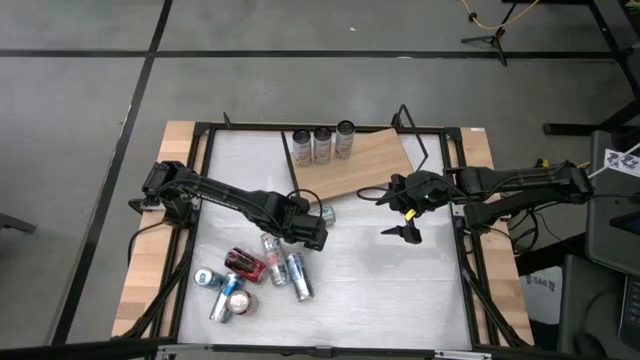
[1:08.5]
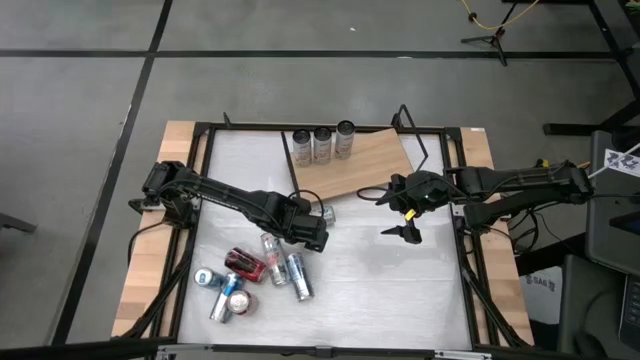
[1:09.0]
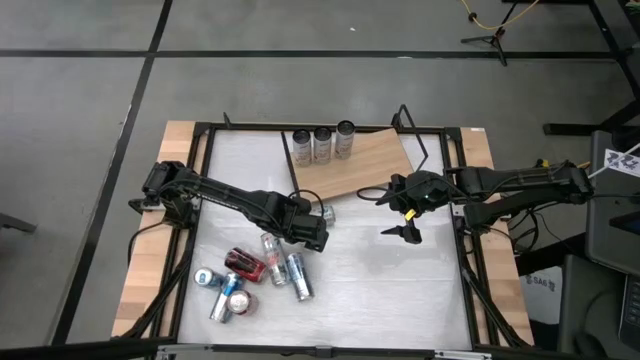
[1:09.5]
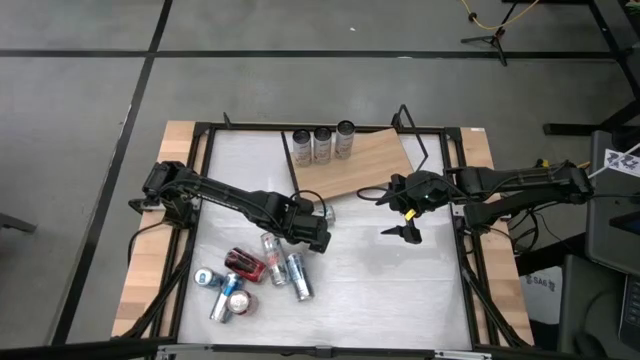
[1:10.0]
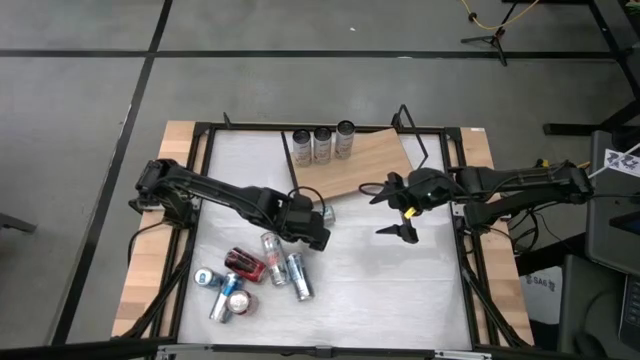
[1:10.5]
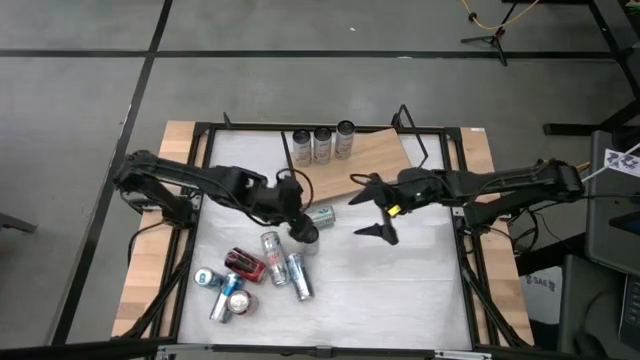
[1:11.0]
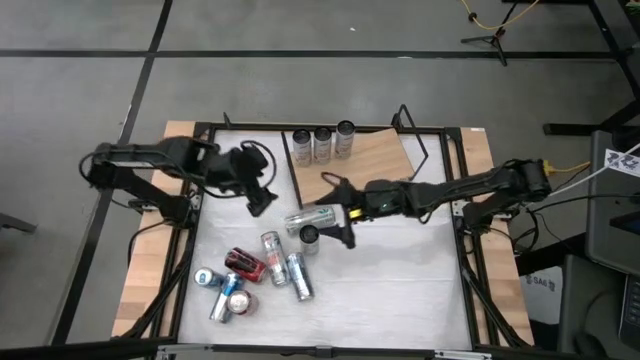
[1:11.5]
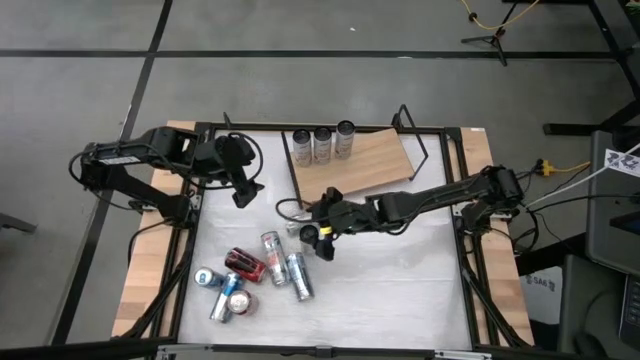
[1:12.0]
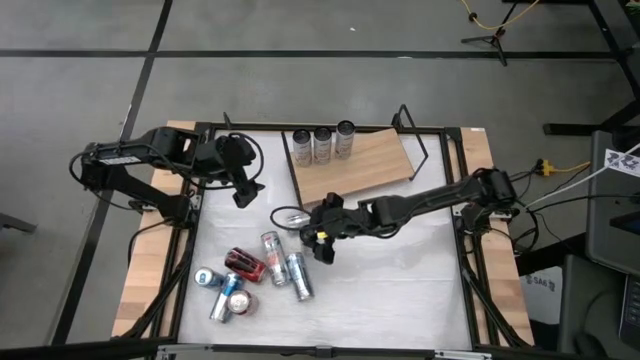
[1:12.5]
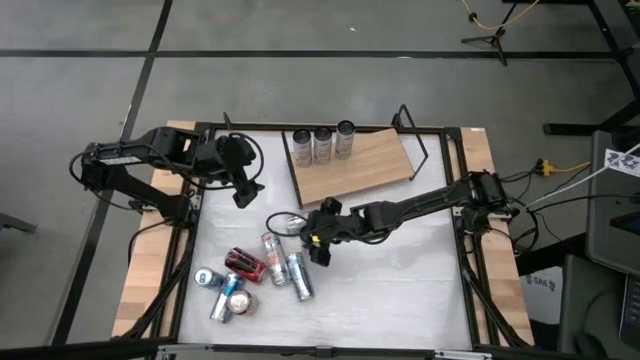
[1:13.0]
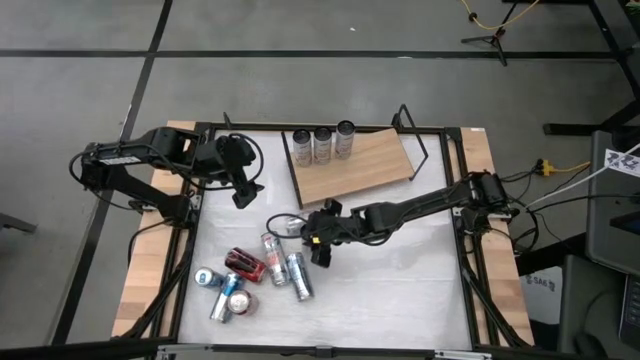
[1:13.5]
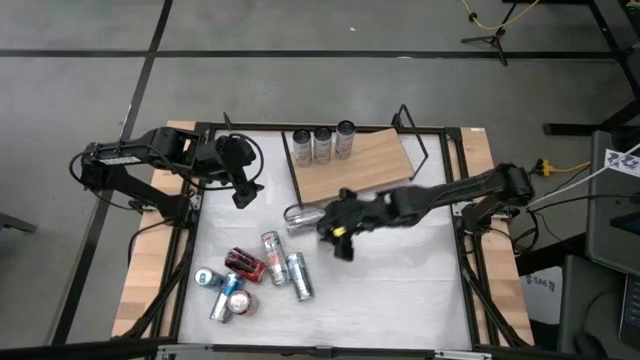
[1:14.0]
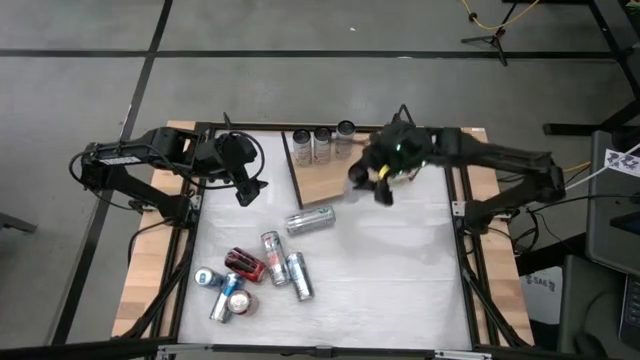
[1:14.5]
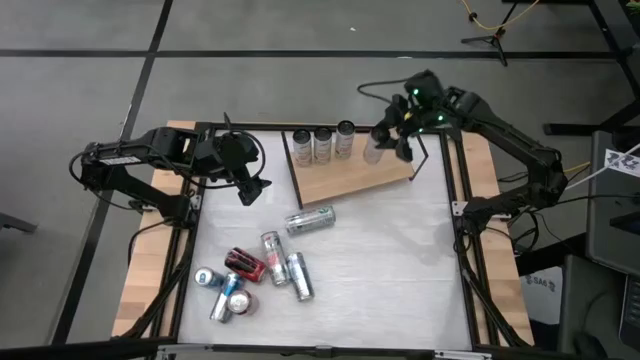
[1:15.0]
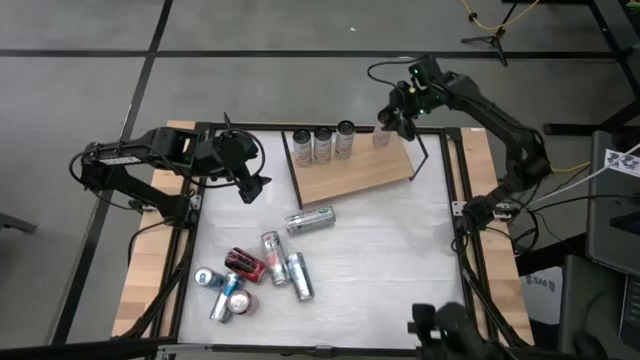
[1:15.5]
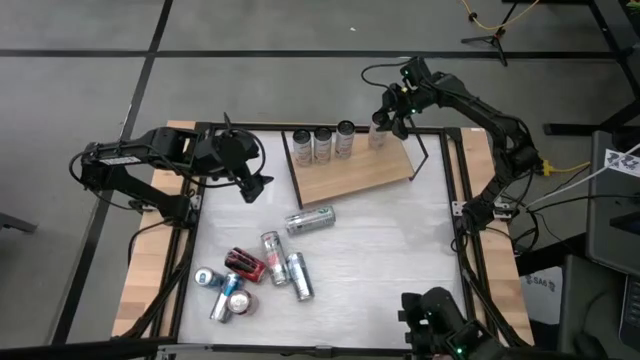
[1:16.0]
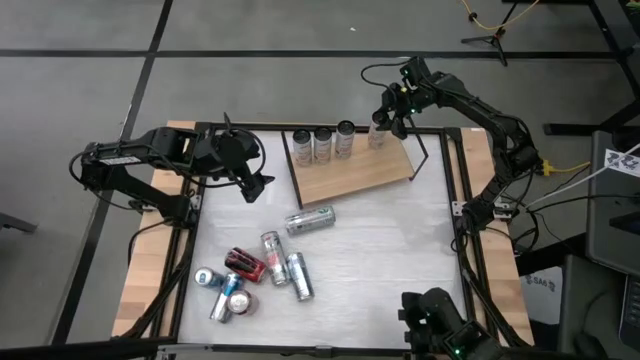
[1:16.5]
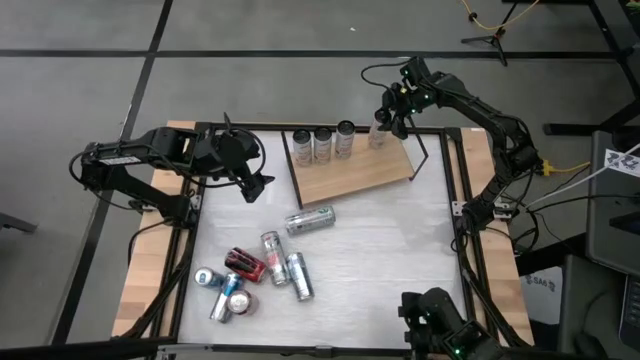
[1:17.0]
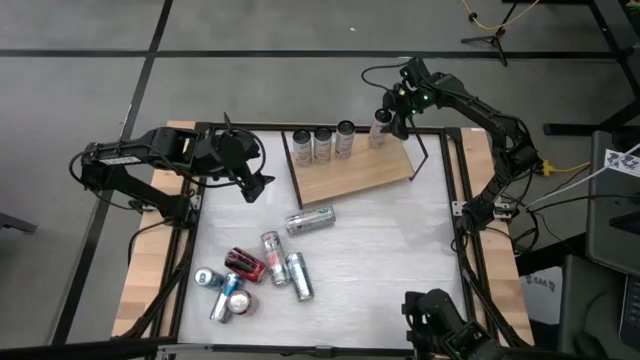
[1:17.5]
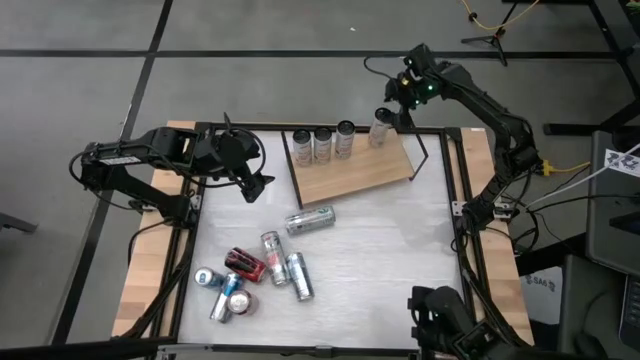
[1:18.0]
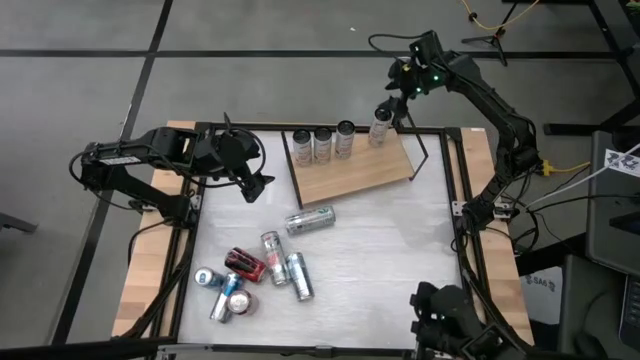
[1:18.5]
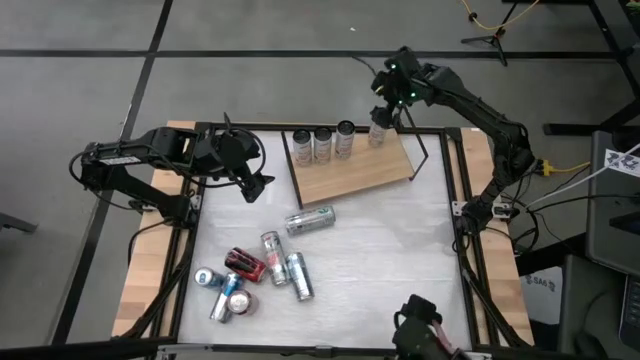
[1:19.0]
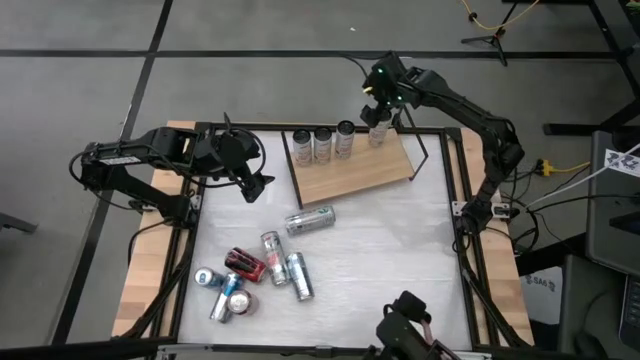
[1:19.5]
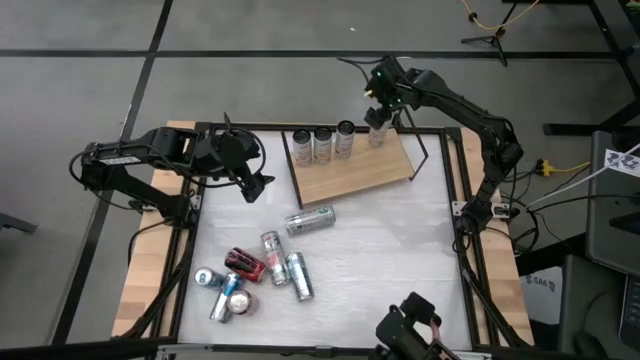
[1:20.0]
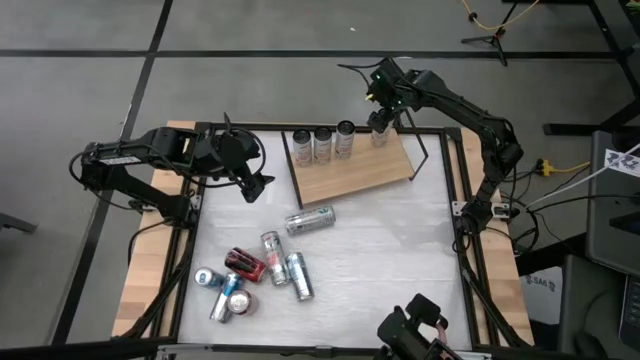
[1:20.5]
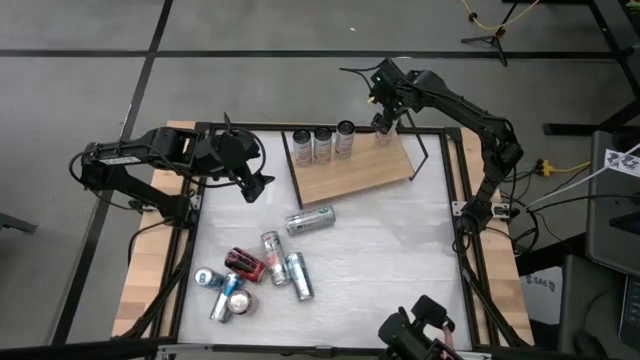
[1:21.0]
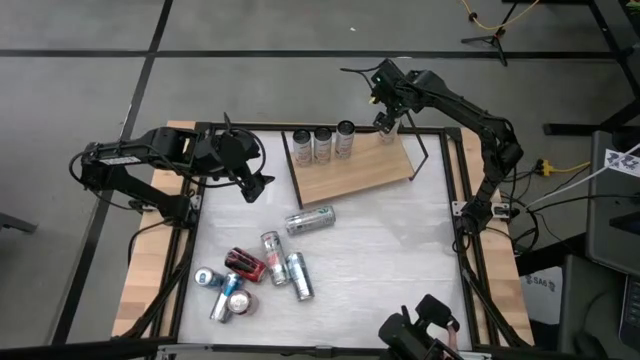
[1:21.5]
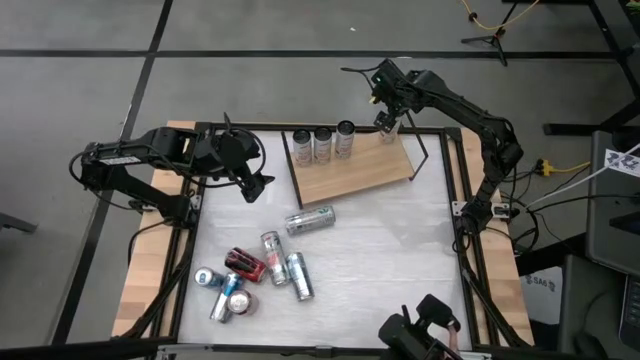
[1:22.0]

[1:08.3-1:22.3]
Task: Place canned beverage on shelf
Put the white pink soda can on the shelf aligned with the other white pink soda can

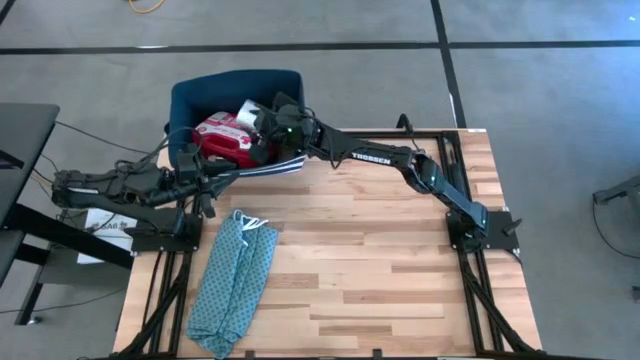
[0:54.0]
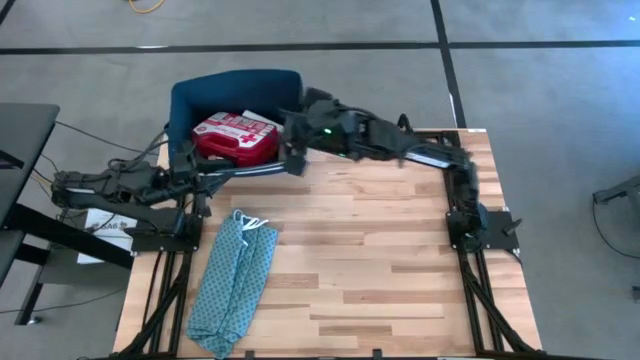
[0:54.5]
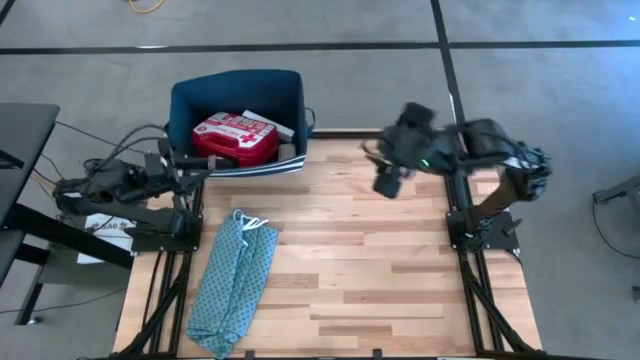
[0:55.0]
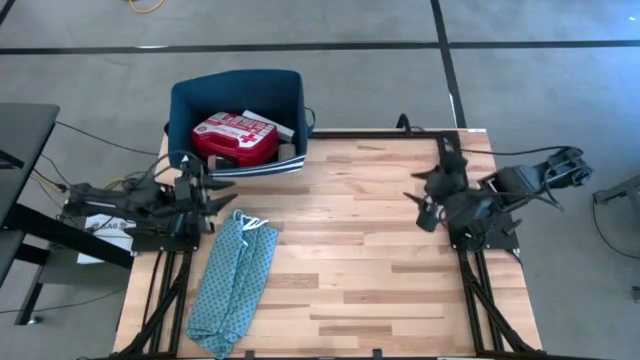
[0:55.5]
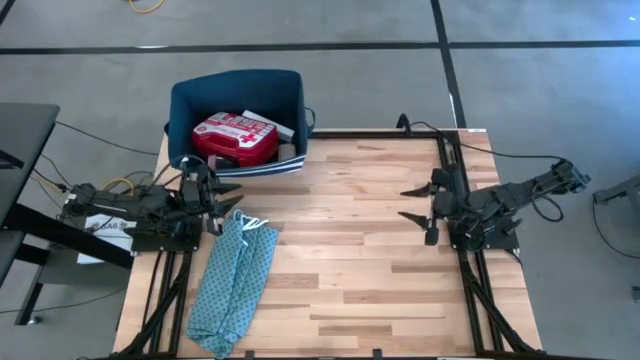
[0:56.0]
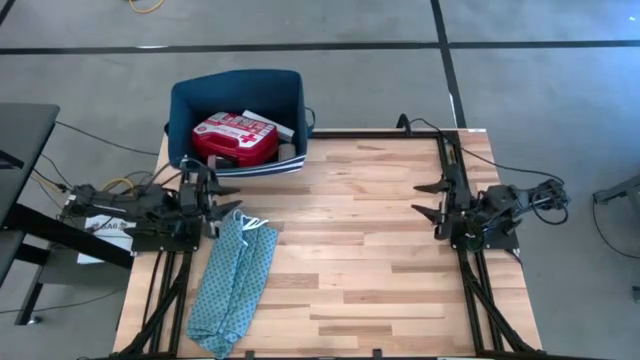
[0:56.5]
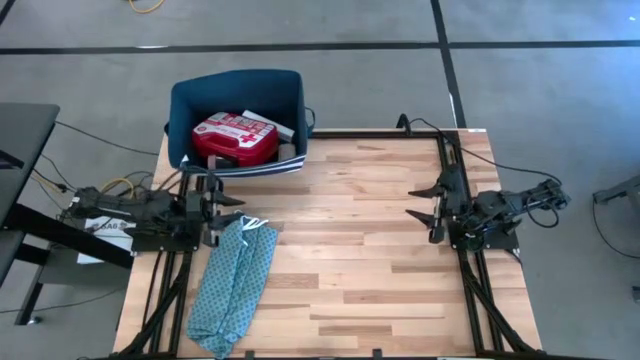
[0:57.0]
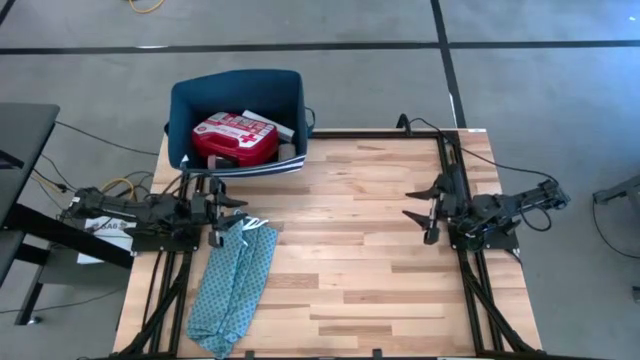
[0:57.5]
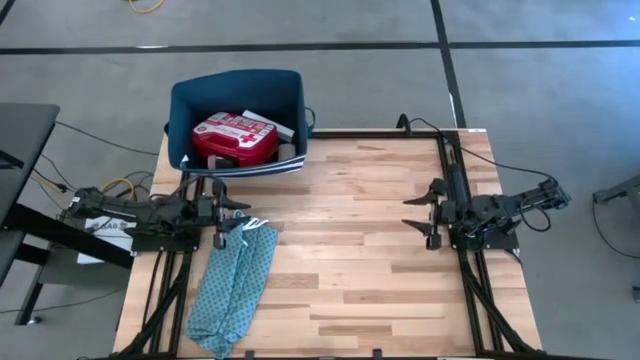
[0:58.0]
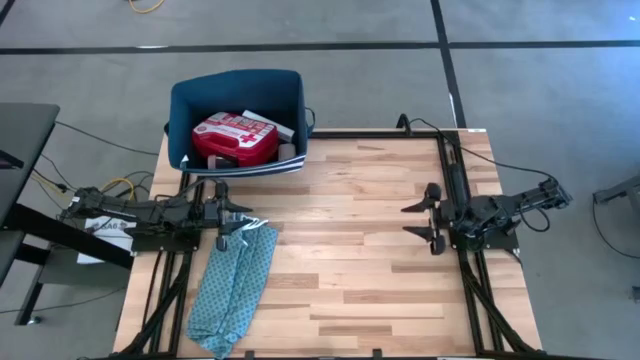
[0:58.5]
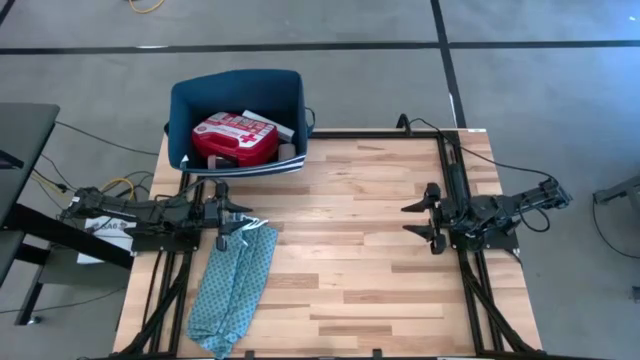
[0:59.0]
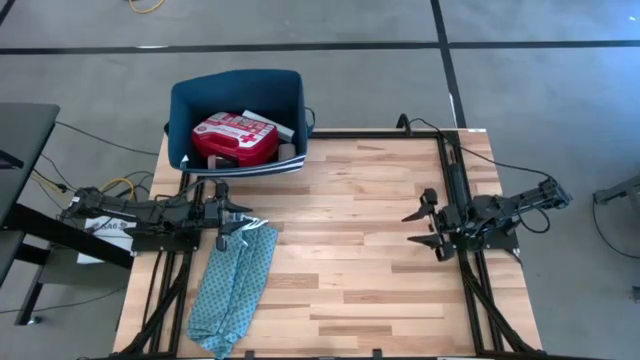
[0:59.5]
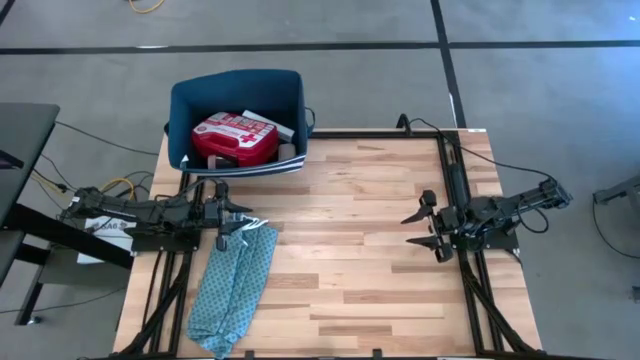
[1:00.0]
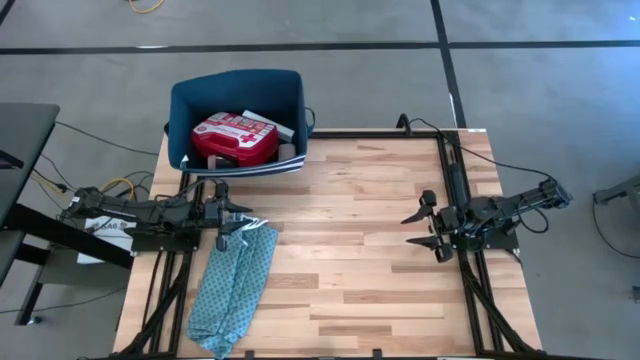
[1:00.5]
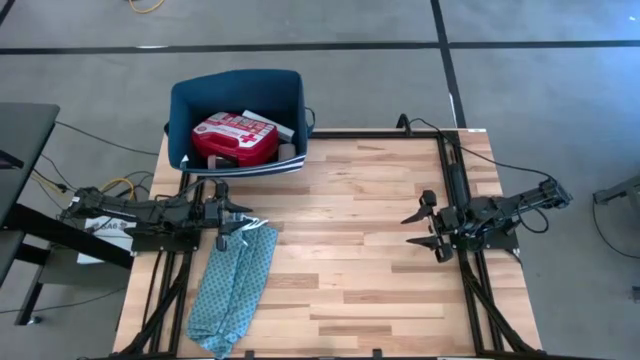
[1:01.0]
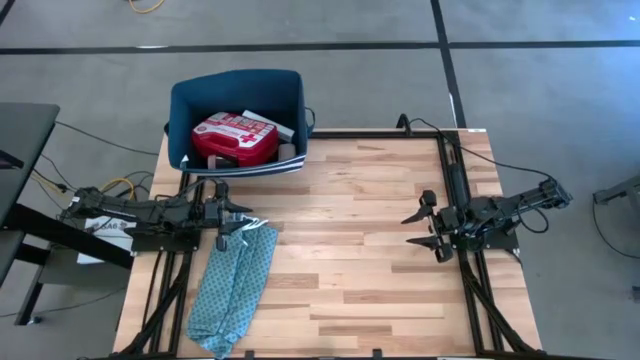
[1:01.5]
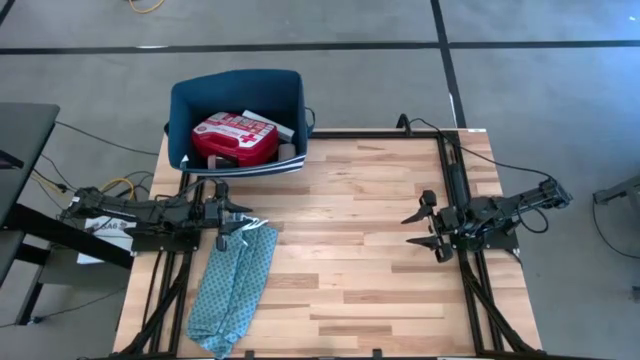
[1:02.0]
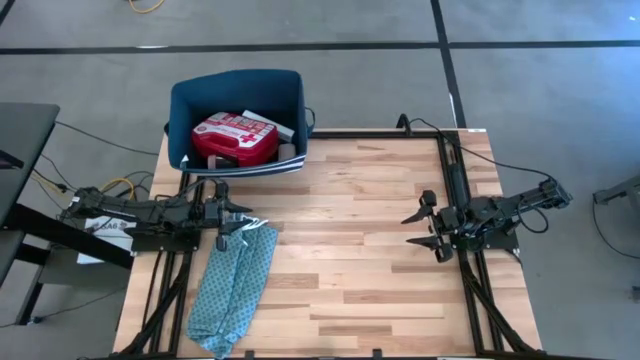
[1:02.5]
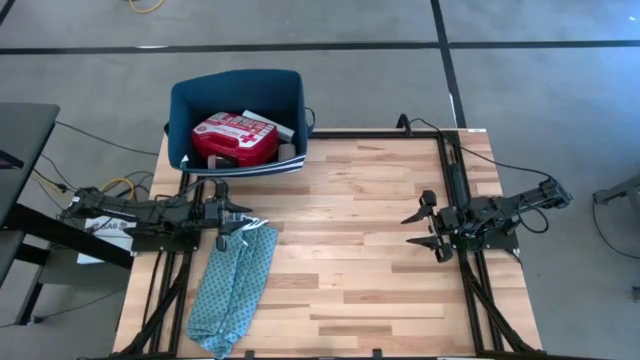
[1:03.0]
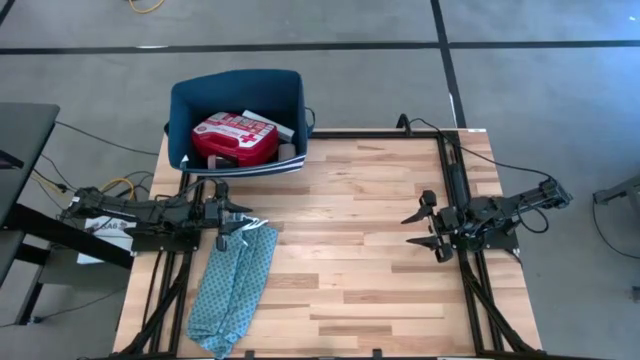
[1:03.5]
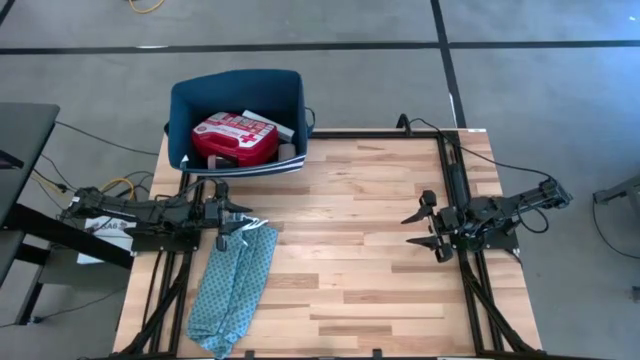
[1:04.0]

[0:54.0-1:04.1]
Task: Pick & place medical supplies in basket/bin
Return to Home Position
